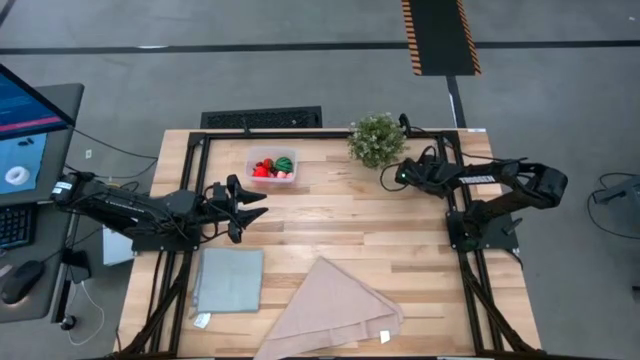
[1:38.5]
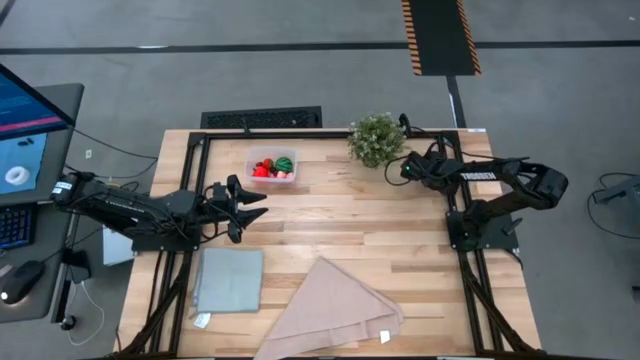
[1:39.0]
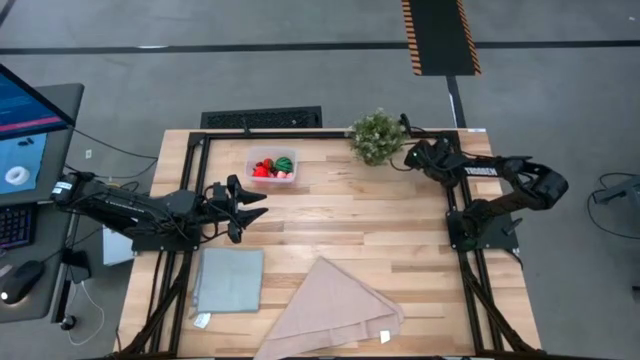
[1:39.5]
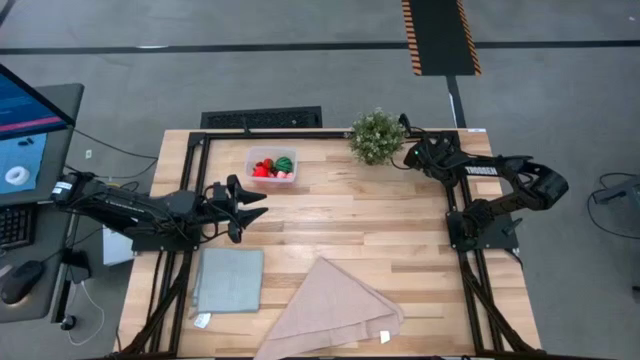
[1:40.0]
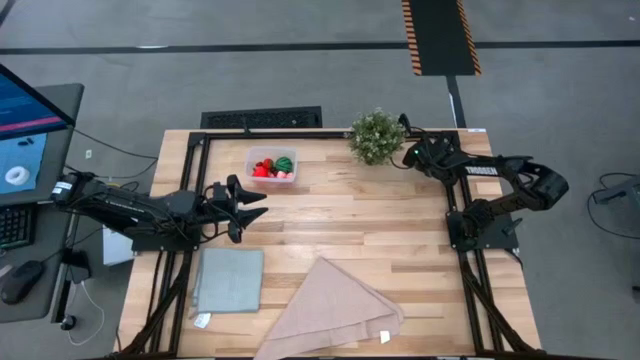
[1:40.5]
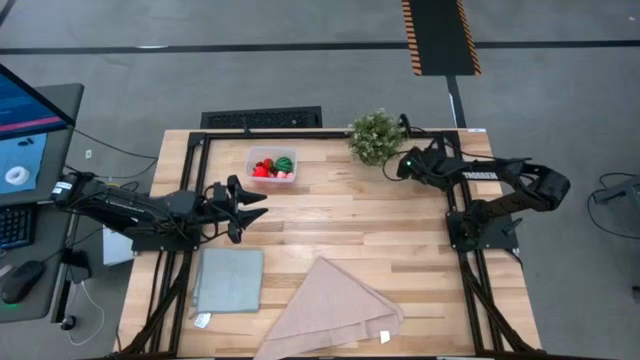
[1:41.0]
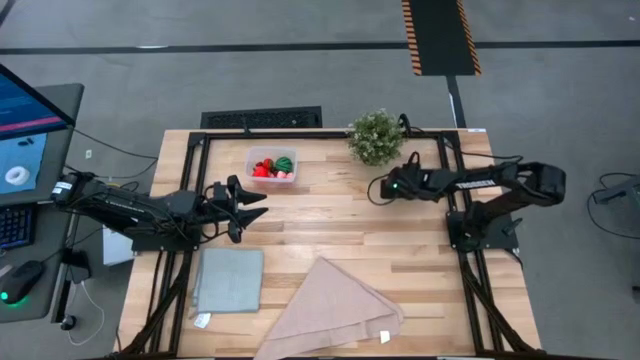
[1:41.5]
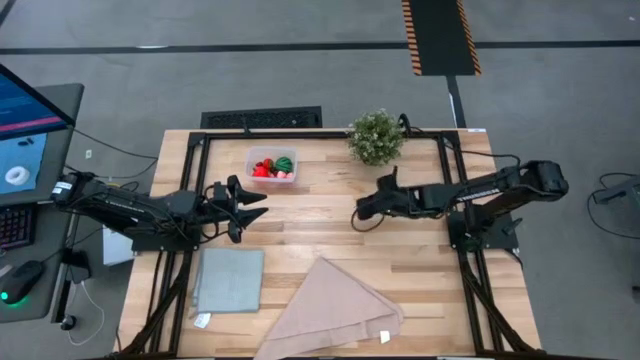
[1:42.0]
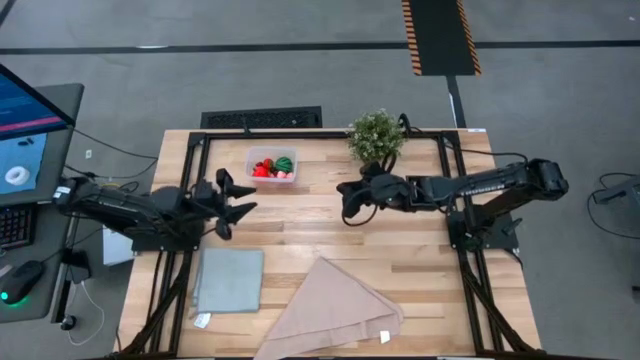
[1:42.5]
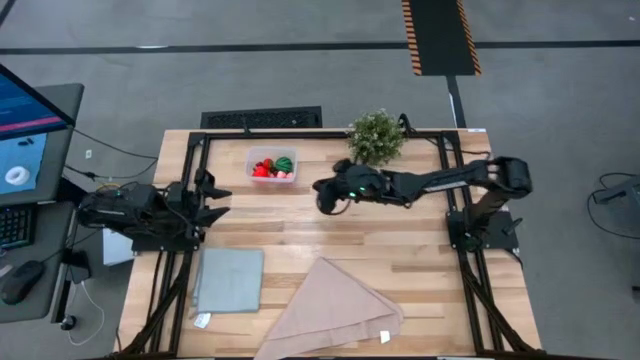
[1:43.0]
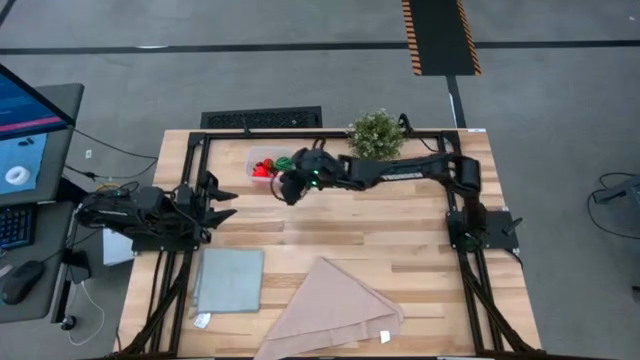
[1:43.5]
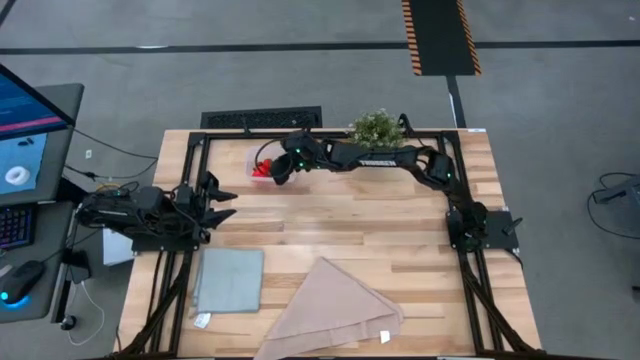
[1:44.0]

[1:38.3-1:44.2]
Task: Pick and placing Produce into tupperware
Put the black berry into the transparent container

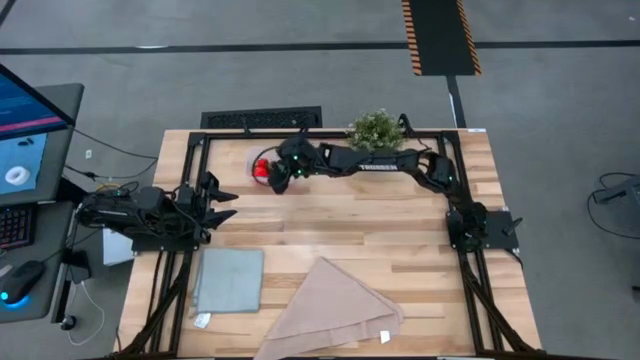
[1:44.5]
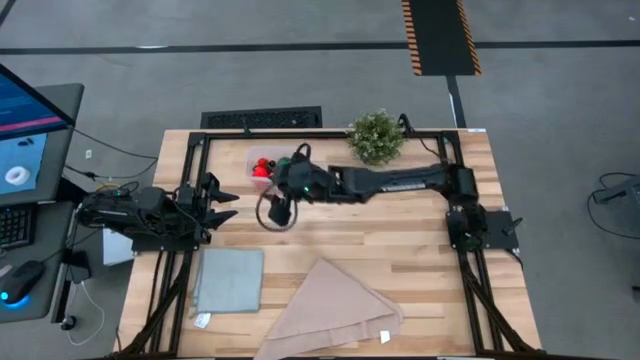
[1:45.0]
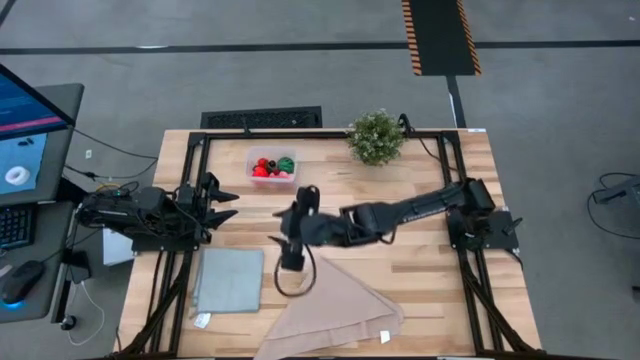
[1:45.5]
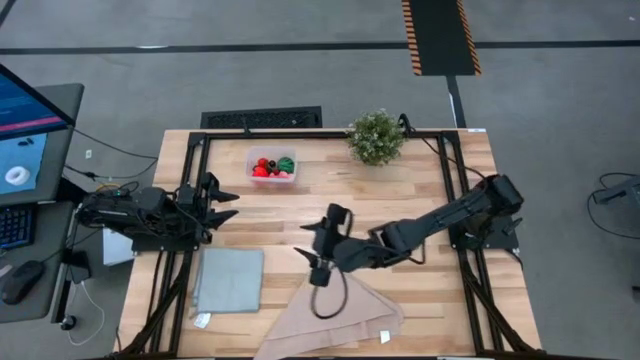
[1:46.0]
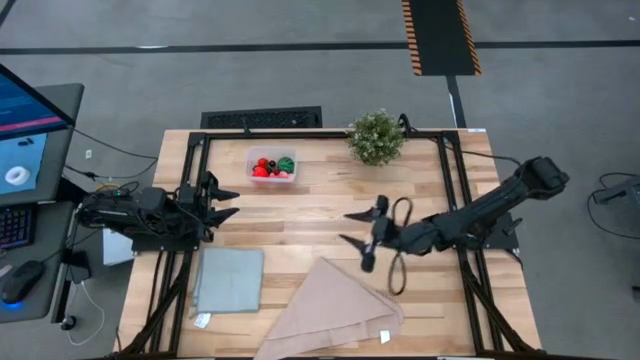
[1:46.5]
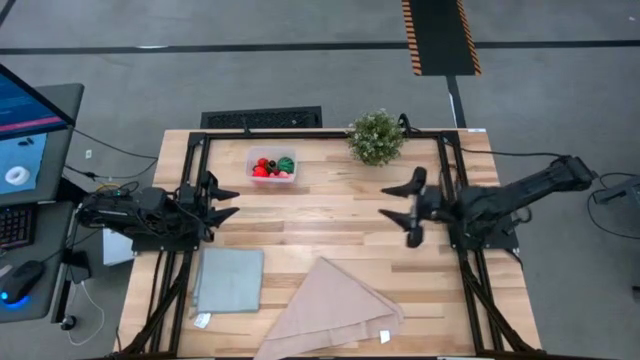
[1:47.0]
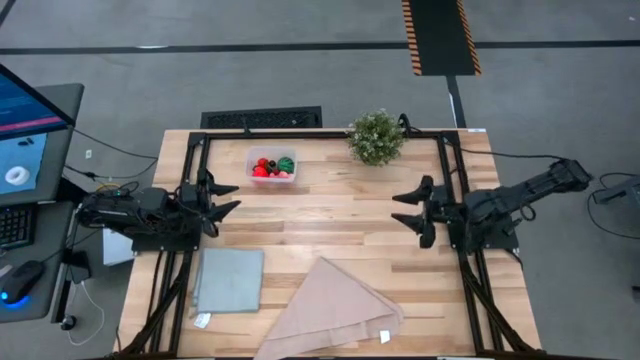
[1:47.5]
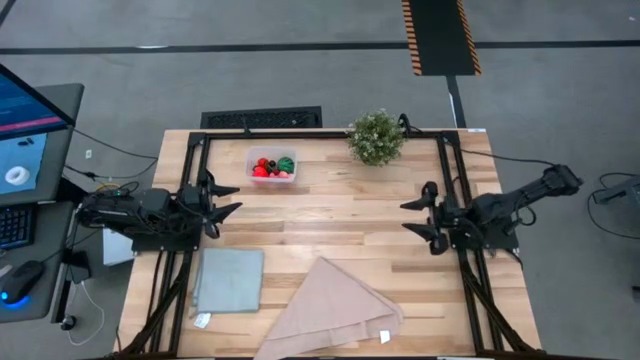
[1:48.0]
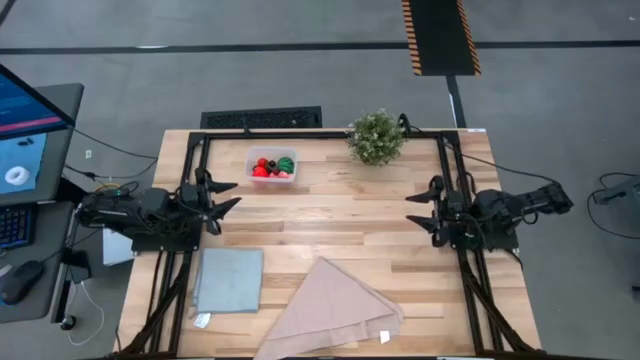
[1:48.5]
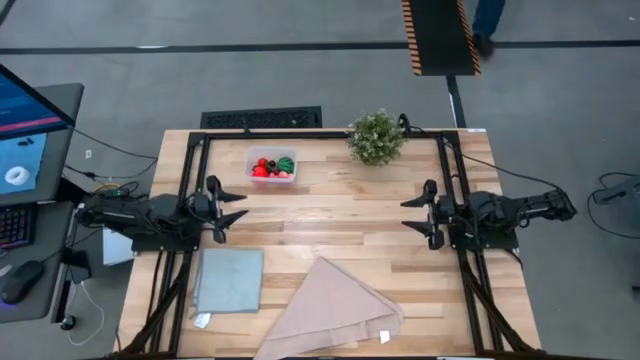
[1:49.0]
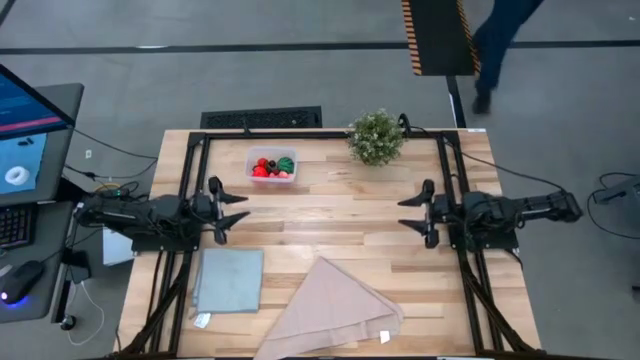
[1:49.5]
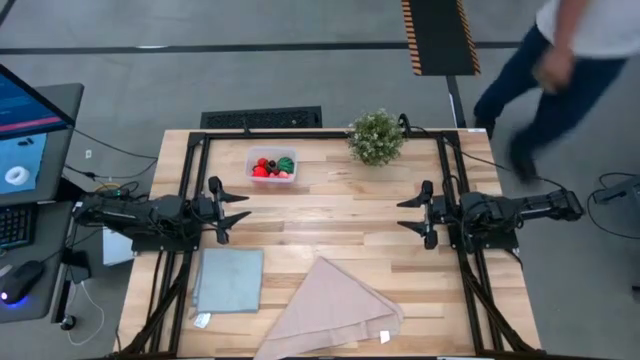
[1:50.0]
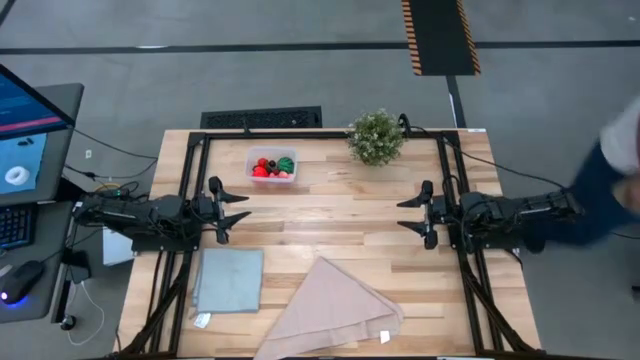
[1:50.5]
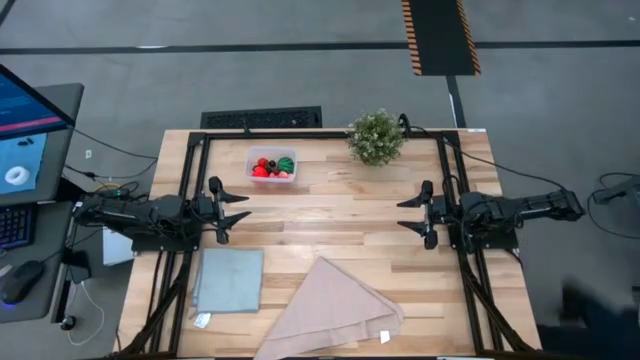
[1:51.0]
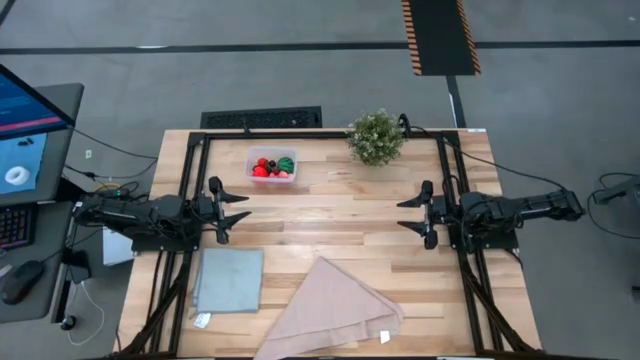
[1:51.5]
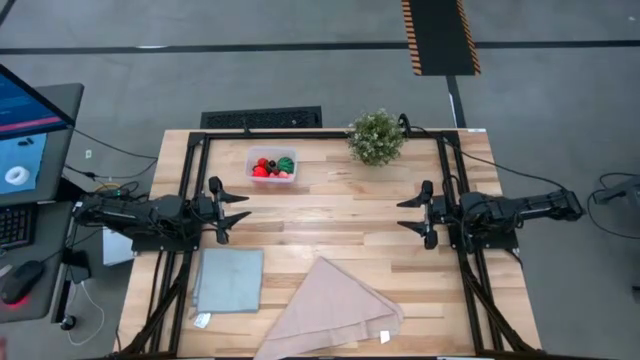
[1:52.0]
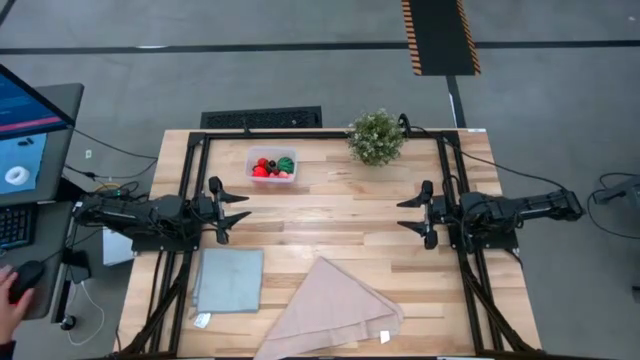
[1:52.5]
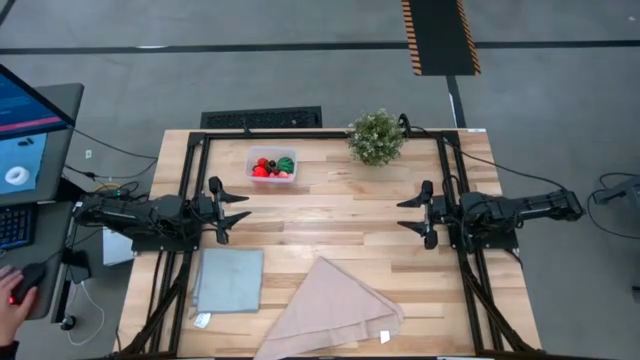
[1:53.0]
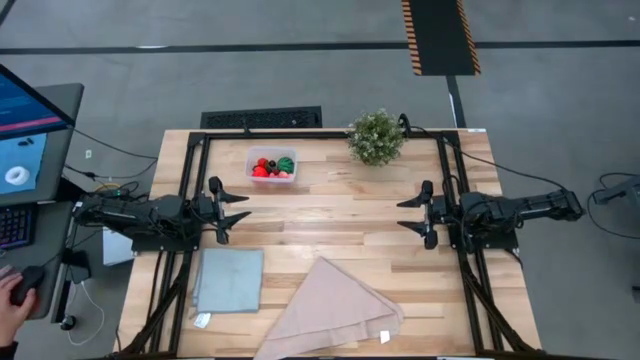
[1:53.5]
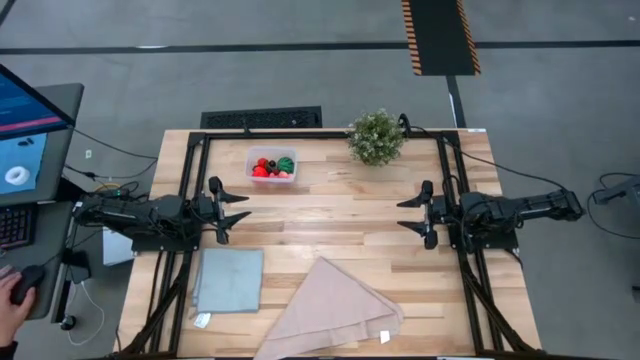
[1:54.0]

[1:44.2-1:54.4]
Return to Home Position
